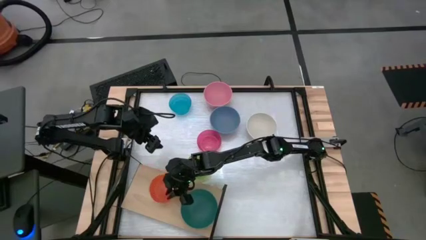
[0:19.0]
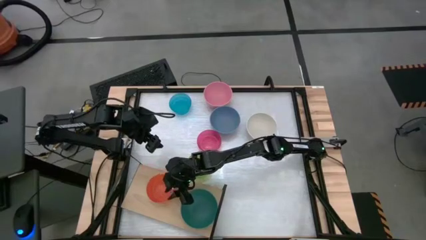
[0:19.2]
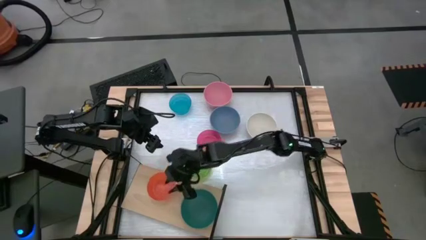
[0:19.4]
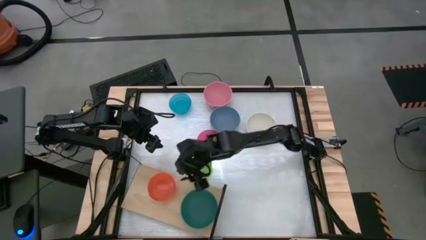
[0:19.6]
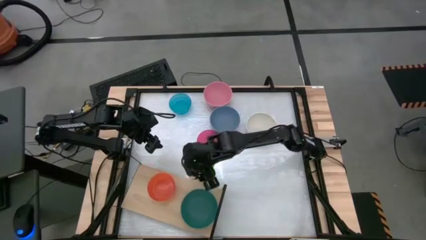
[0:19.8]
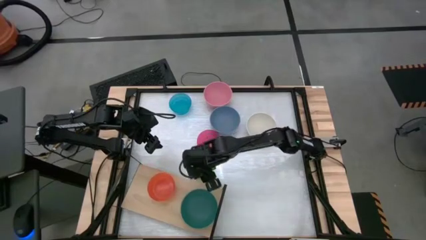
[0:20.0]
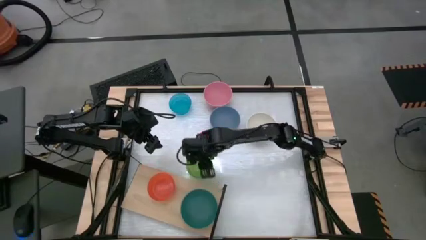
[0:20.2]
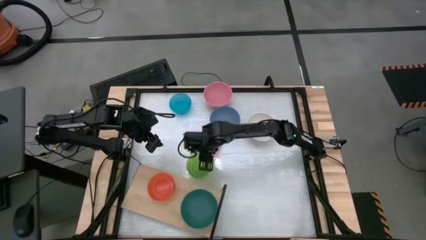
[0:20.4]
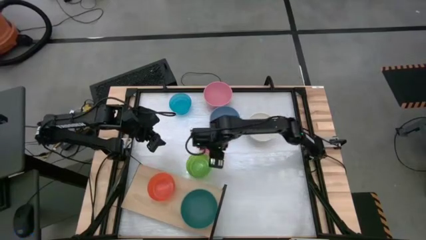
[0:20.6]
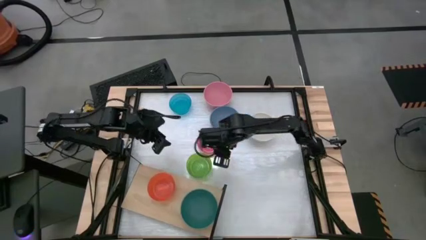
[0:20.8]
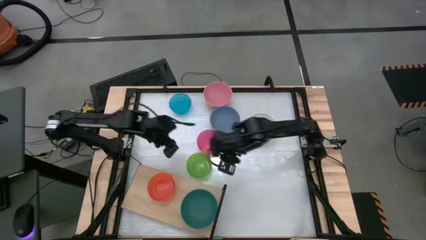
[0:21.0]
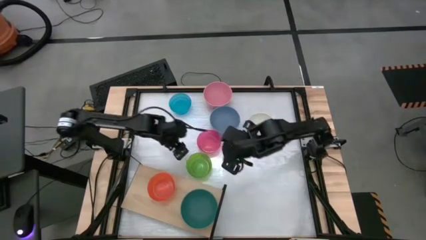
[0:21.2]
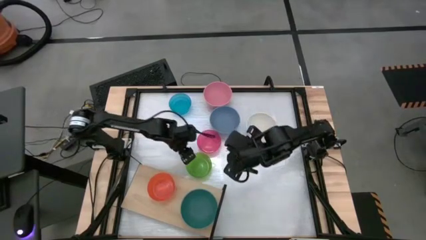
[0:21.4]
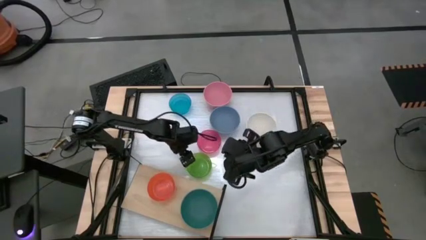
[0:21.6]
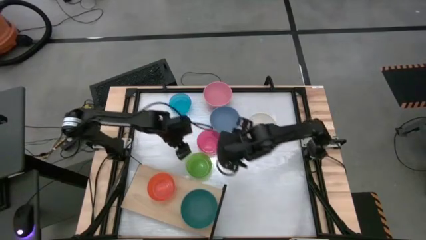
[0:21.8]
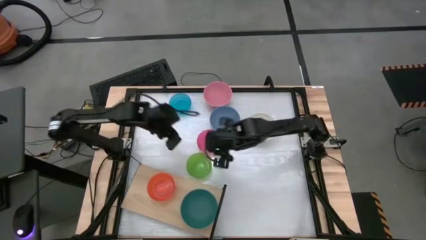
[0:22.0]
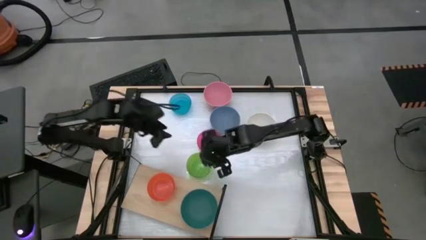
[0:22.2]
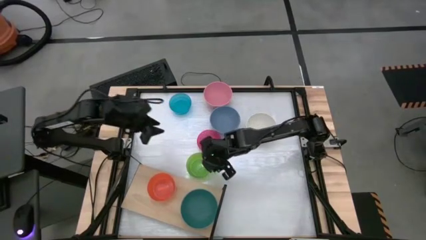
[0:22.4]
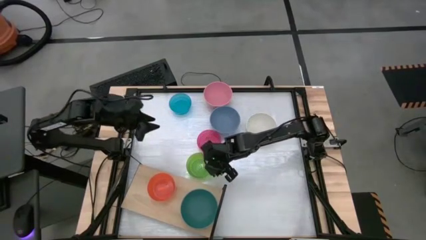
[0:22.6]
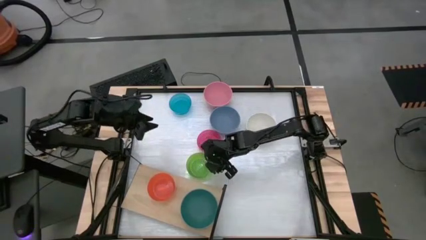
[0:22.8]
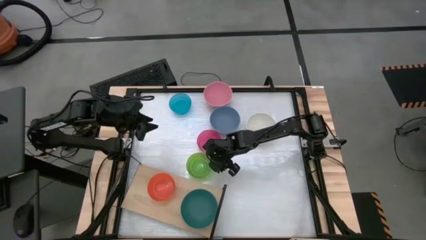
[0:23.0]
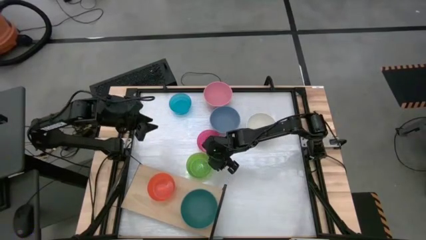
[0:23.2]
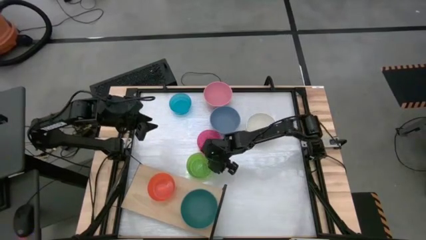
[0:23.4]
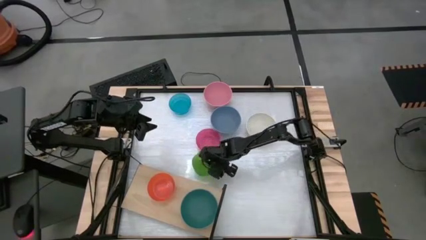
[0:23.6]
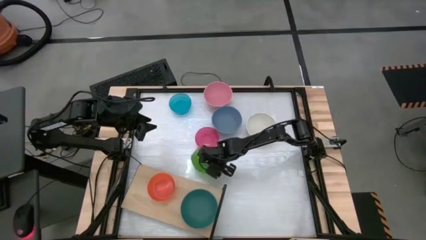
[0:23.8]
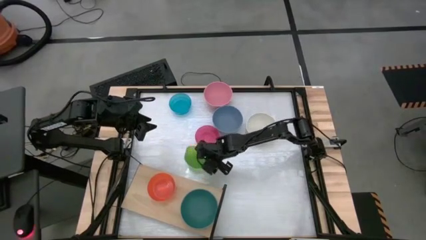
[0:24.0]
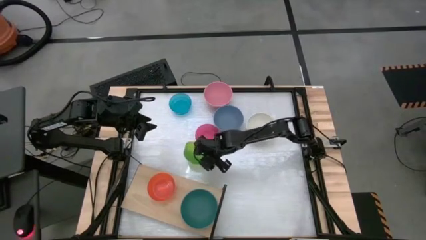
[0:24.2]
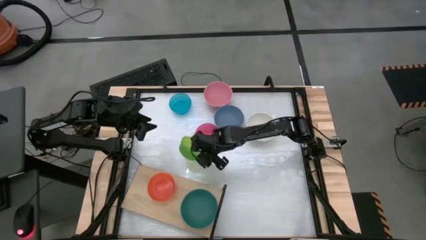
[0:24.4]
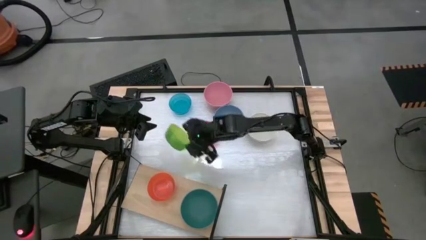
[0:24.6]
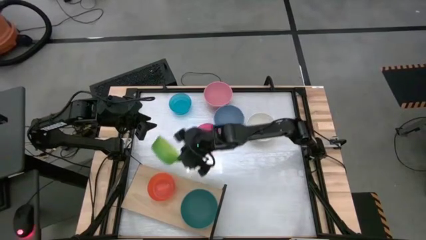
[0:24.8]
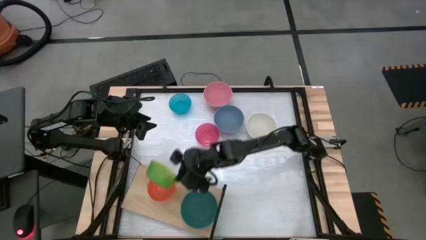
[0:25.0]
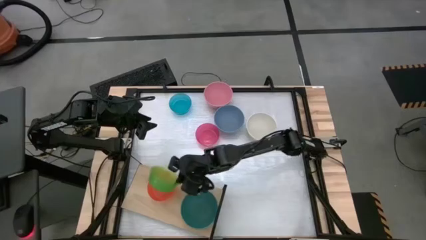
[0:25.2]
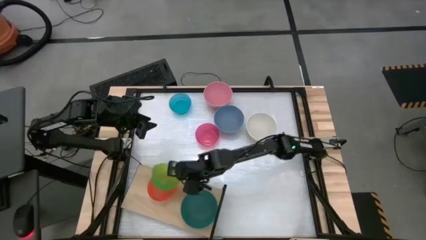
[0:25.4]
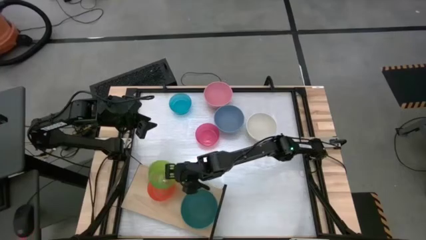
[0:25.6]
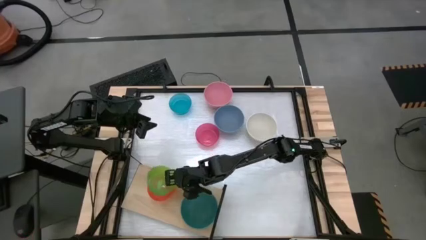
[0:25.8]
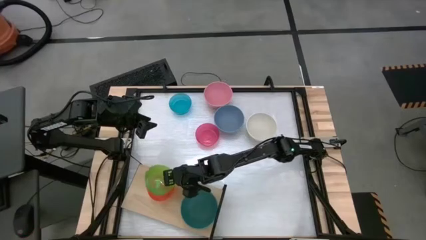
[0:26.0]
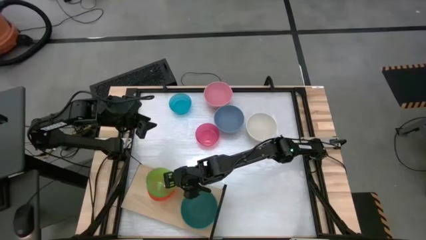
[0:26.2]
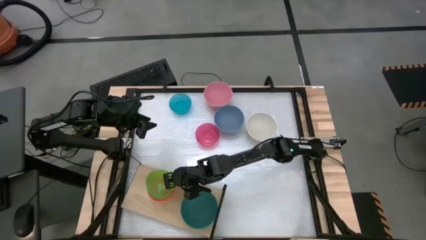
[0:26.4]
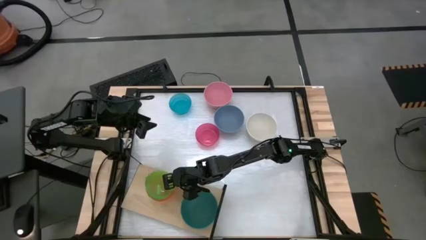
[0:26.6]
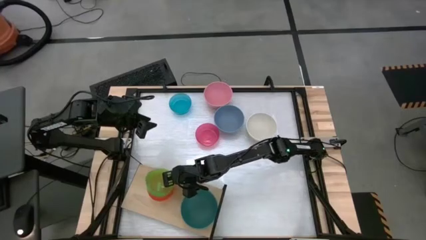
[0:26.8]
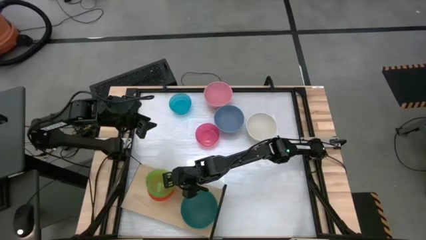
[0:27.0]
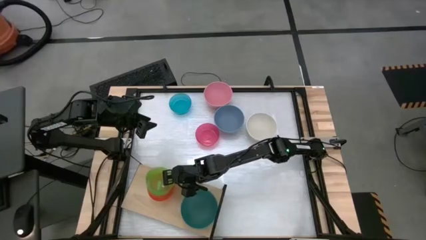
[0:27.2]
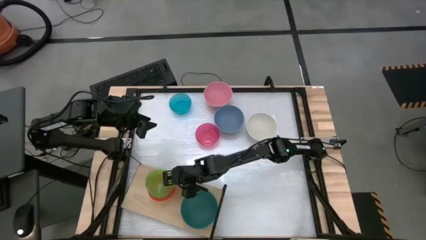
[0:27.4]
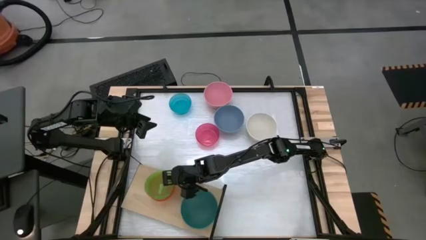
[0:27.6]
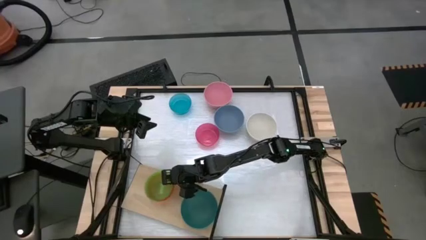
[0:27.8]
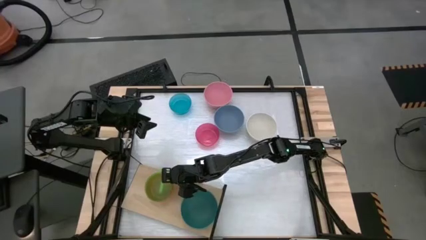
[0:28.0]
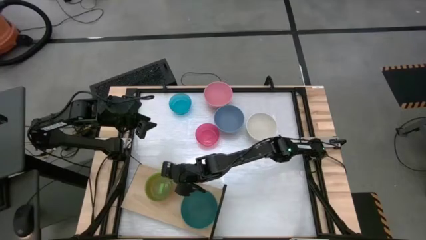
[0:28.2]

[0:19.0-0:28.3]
Task: Place and stack bowls onto a shelf
Stack the green bowl on top of the orange bowl on the shelf

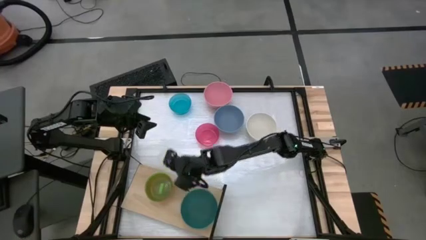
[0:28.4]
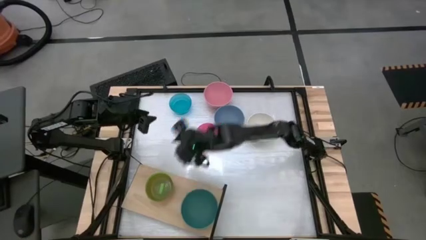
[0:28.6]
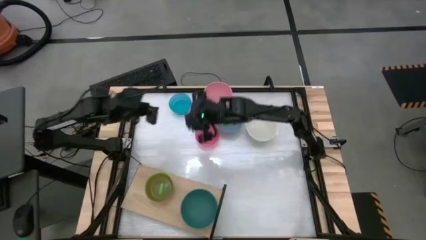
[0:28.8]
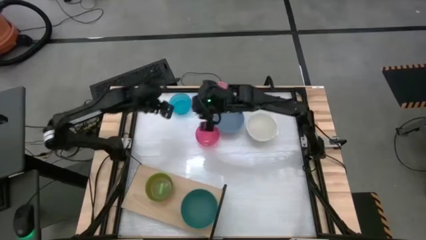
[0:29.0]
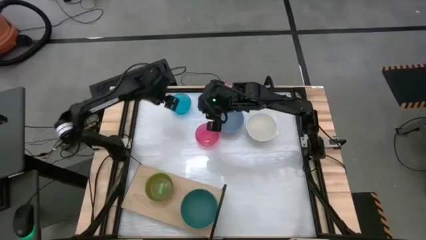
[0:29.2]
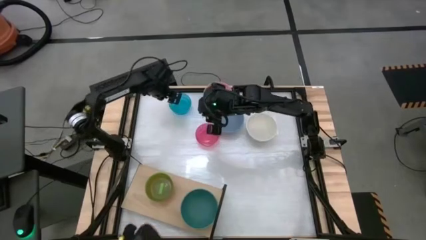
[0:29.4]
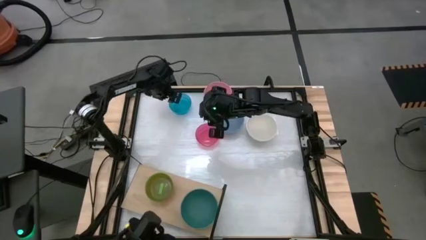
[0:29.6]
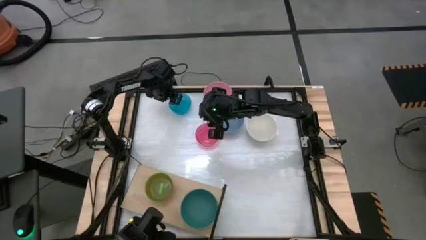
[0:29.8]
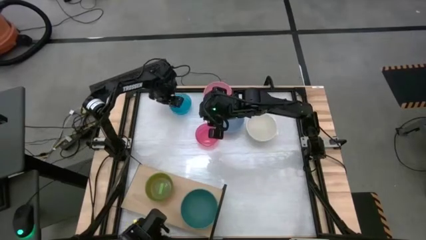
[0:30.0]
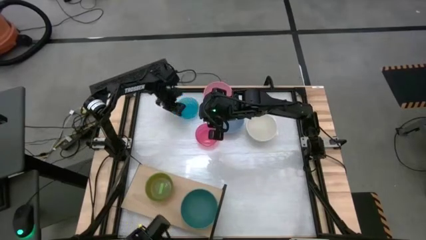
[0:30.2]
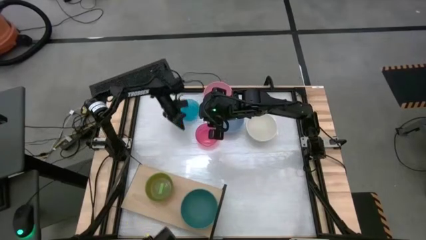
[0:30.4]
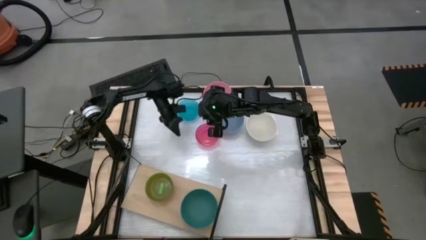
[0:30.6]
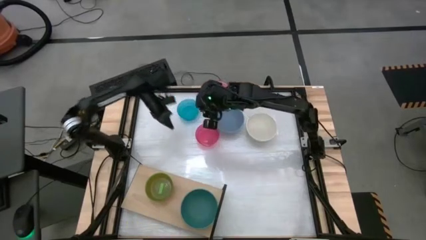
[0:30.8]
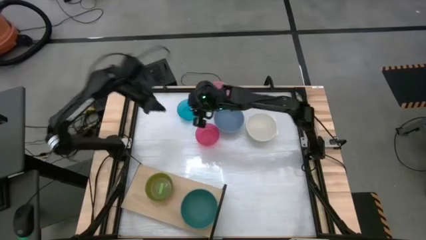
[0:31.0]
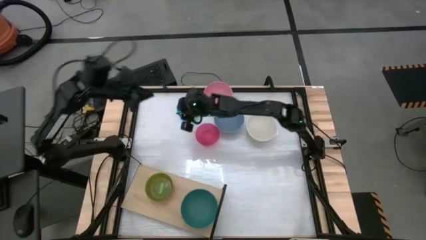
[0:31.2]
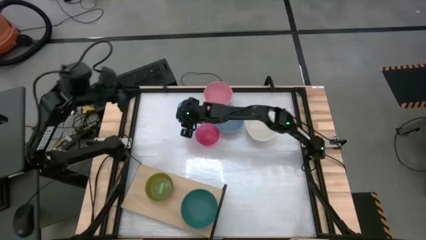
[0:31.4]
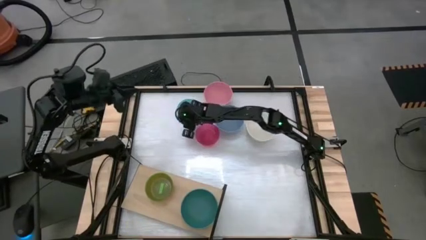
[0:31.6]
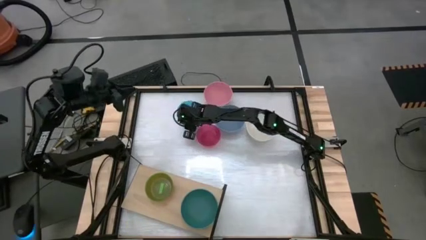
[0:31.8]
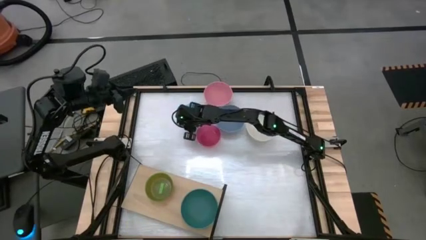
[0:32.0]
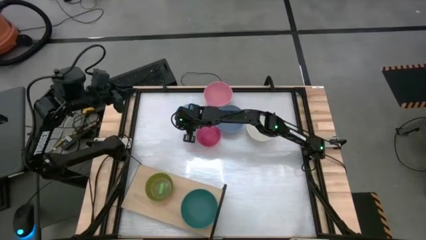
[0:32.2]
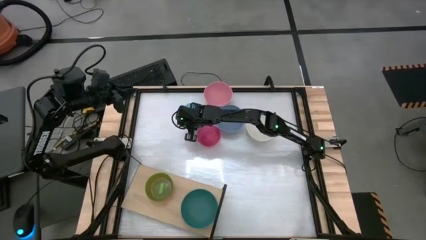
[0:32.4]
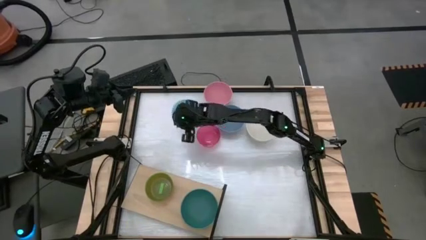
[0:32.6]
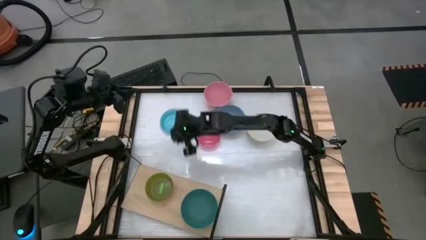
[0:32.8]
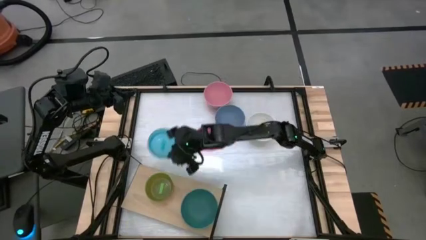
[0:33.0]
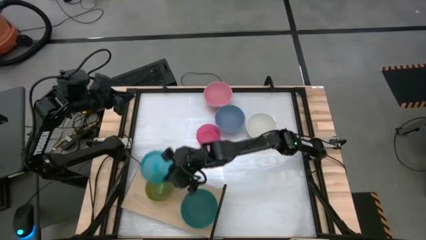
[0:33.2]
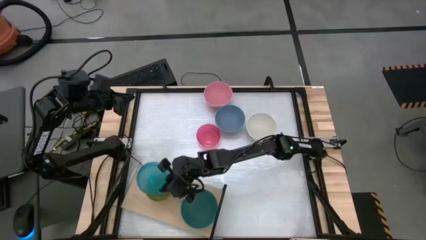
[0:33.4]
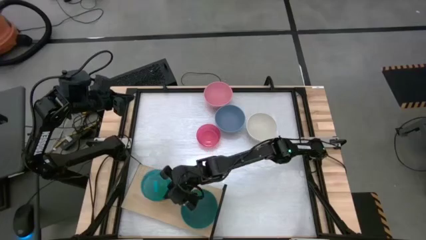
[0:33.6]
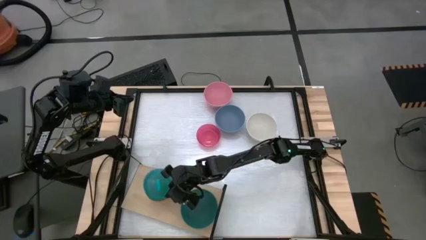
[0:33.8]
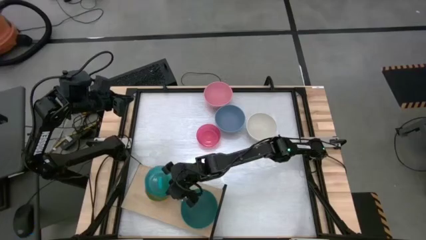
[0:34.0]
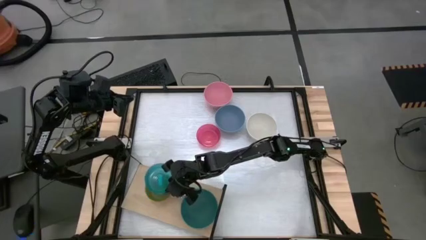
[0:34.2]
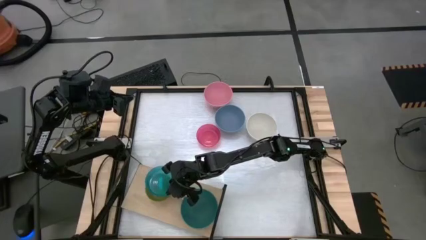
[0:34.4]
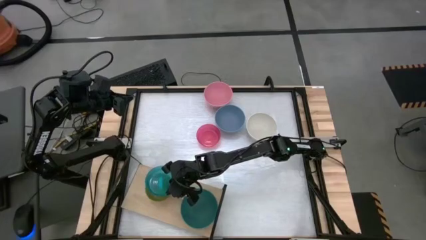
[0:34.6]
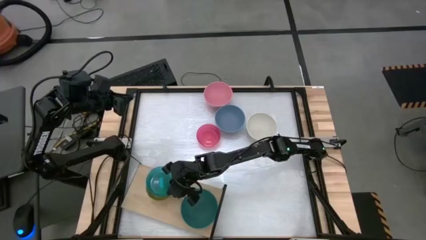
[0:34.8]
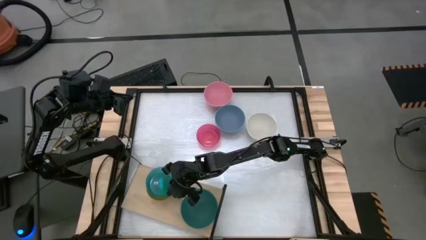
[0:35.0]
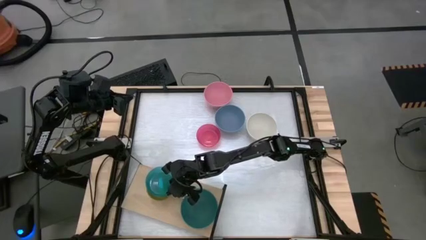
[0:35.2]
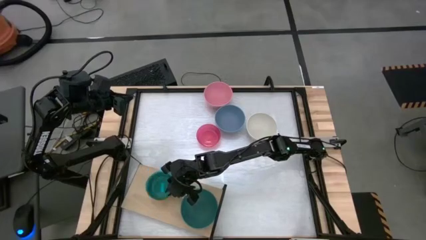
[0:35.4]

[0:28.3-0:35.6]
Stack the light blue bowl on top of the green bowl on the shelf
